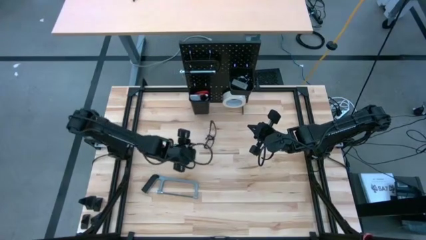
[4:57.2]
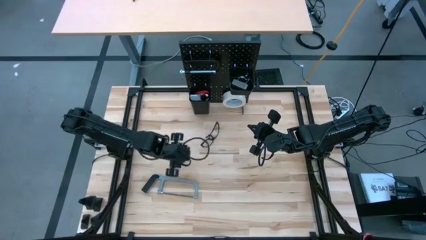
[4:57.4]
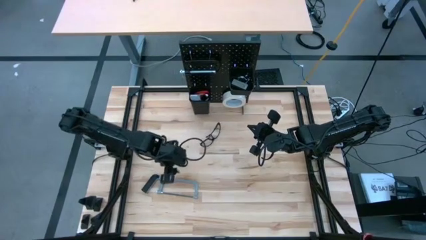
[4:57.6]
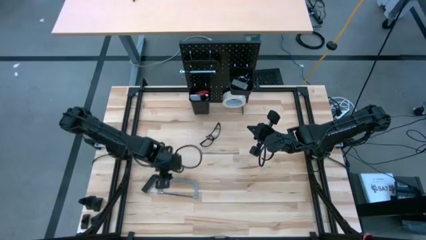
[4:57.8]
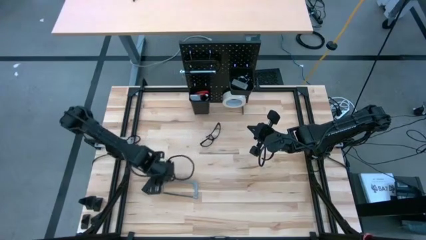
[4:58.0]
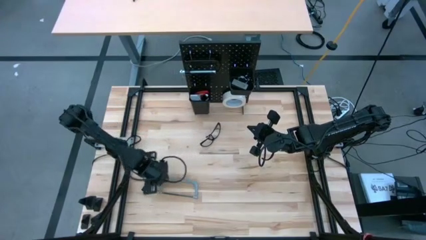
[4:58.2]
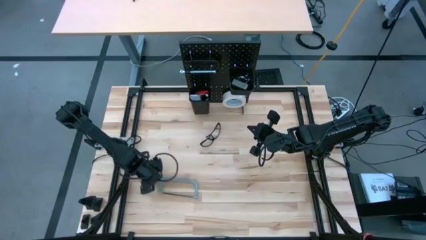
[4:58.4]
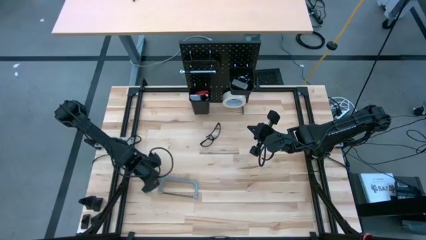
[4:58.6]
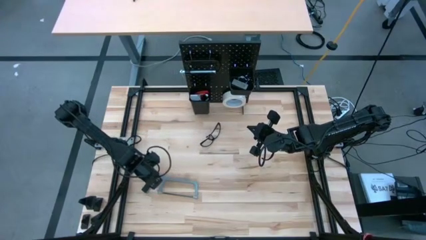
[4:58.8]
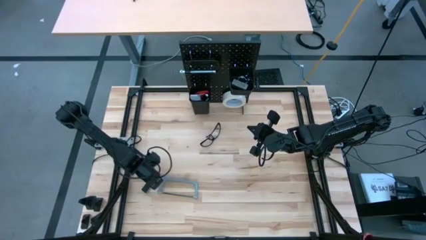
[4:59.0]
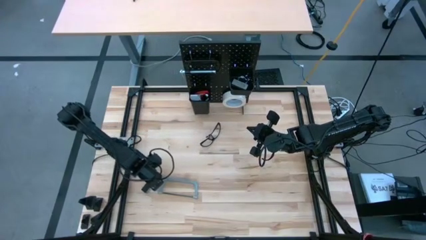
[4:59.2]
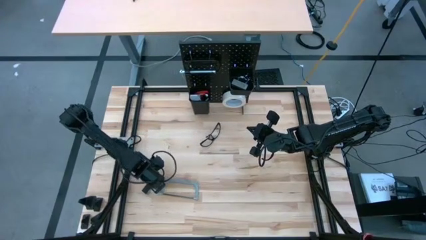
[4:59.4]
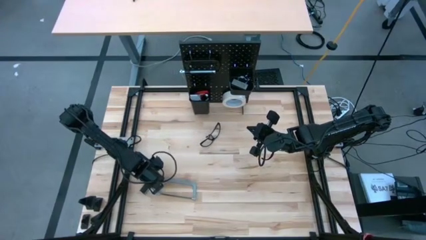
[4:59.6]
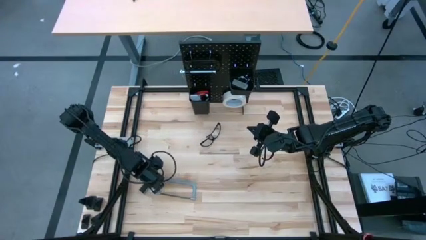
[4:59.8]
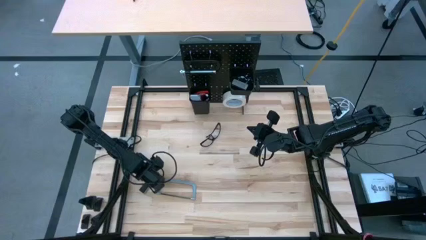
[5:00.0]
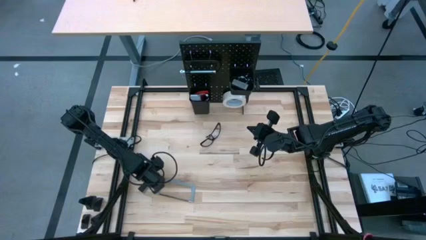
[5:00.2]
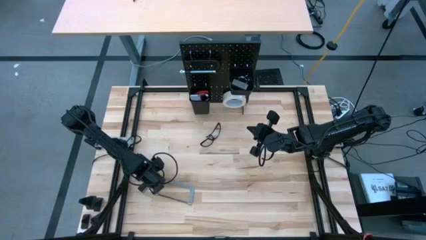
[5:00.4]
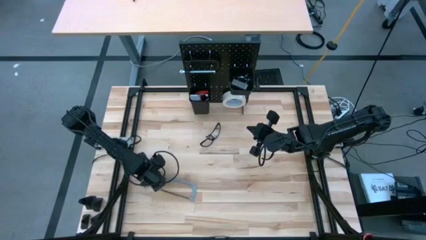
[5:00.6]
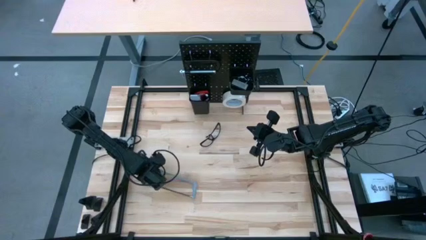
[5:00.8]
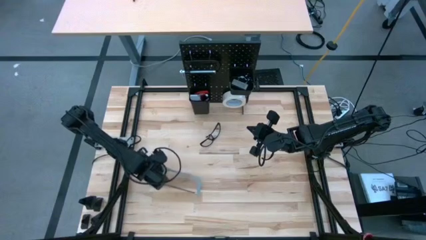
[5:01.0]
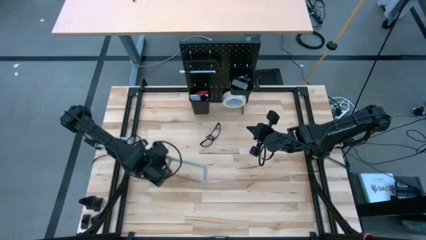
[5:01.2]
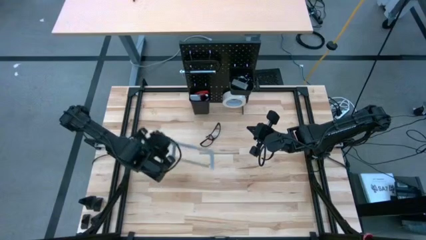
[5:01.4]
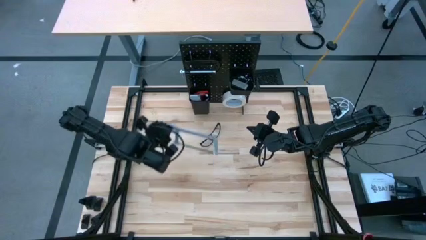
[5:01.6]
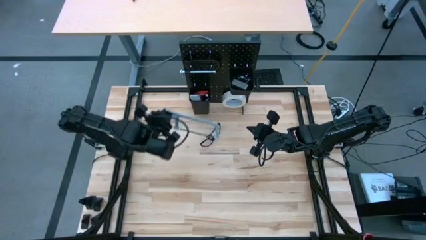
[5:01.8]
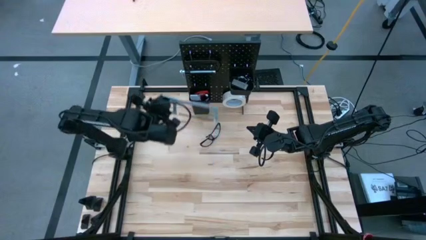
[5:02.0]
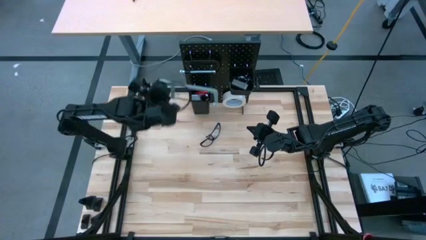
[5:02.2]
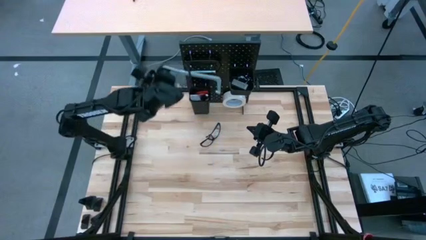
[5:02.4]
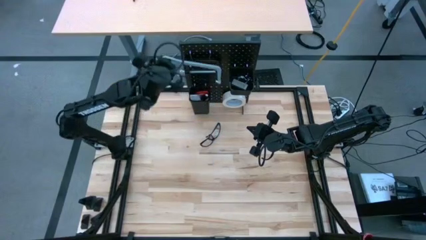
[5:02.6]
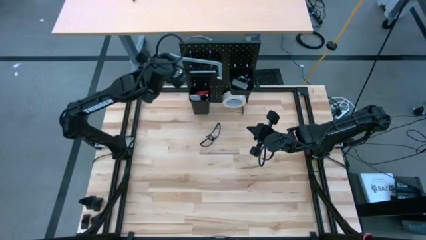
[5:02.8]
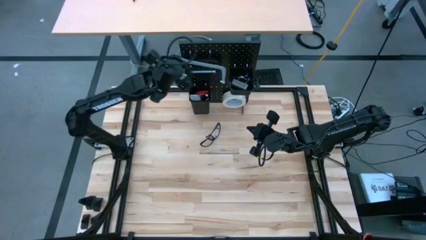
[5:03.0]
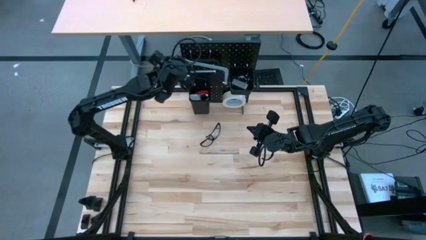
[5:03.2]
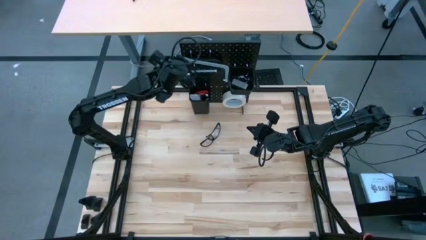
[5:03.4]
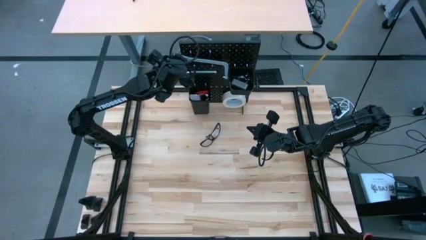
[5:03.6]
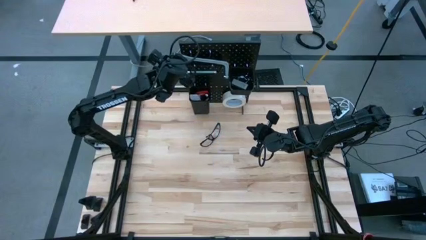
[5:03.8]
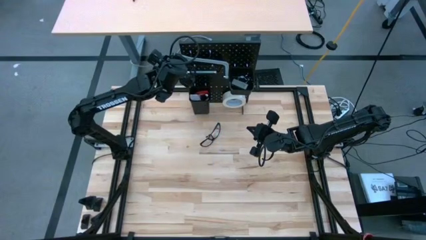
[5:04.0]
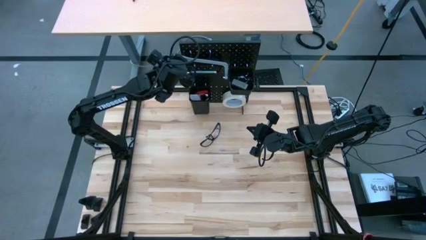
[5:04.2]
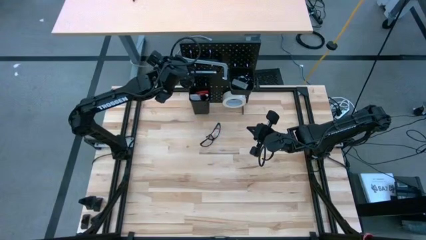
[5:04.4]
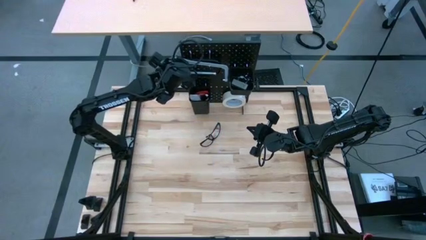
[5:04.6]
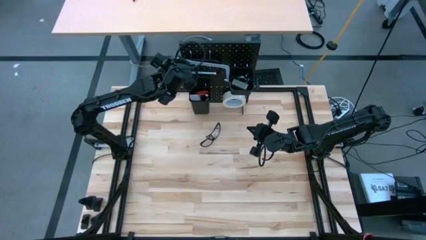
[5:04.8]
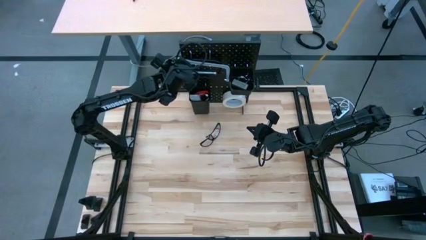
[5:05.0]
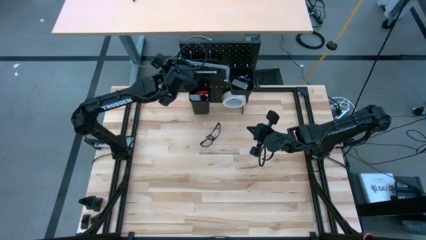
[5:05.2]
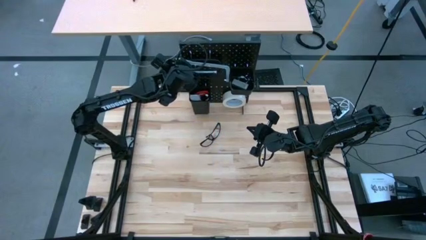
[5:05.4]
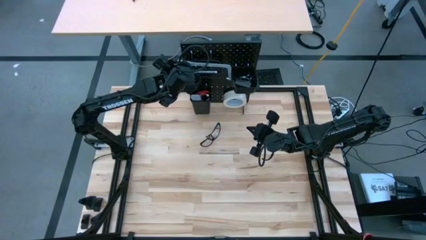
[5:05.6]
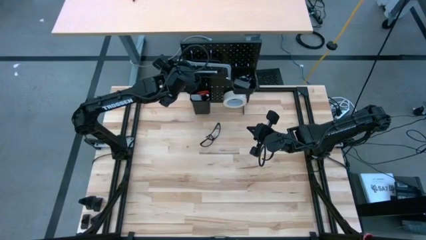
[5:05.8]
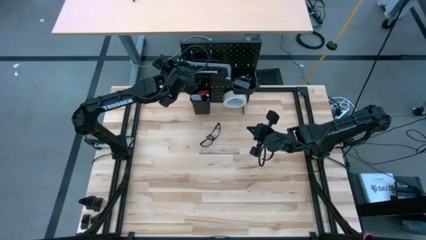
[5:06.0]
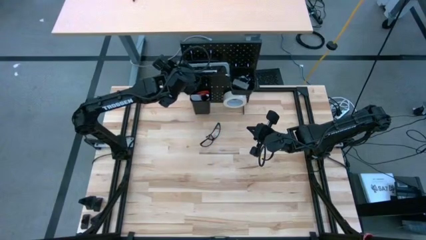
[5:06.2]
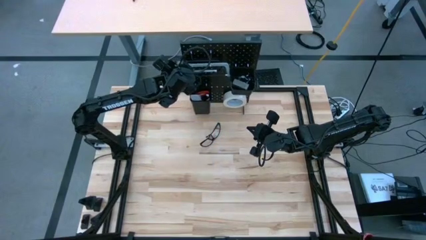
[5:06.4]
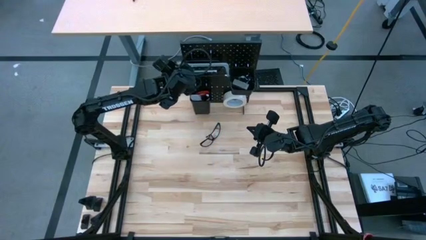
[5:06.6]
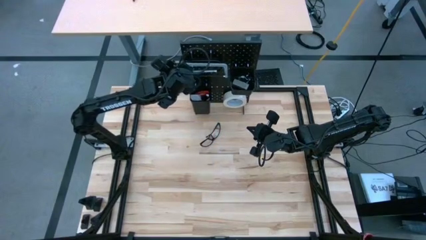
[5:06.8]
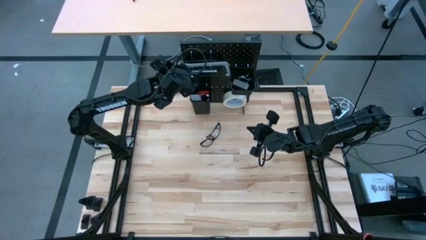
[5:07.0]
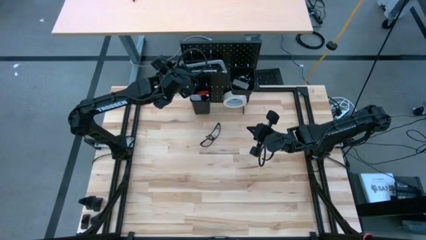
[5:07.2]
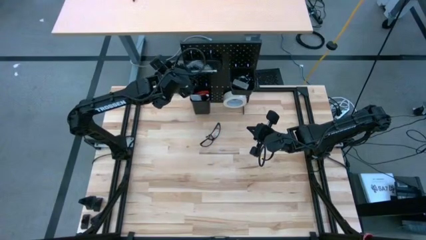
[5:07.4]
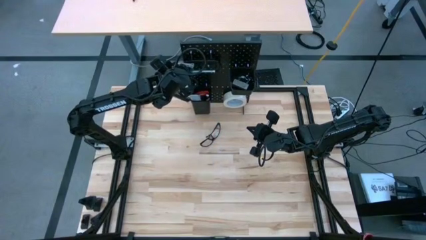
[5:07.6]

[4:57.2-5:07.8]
Task: Hang tools onto peg board
Hang the gray hacksaw on the black peg board

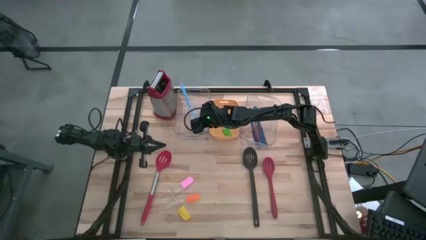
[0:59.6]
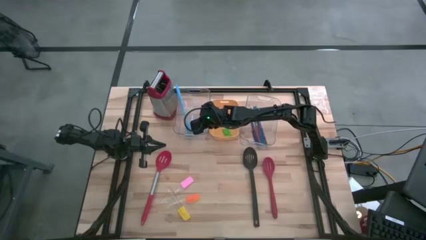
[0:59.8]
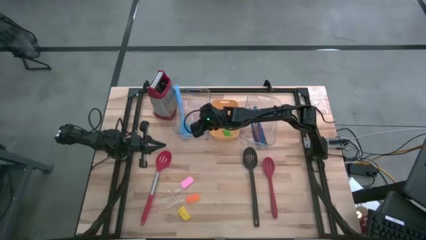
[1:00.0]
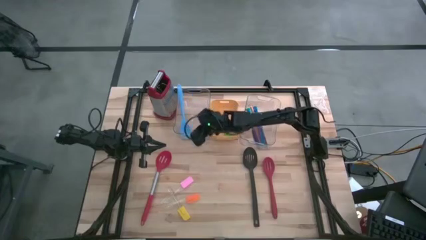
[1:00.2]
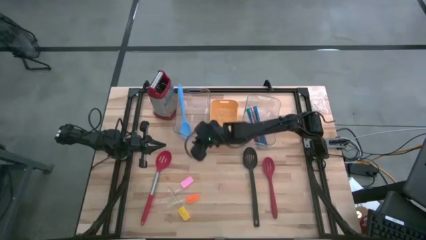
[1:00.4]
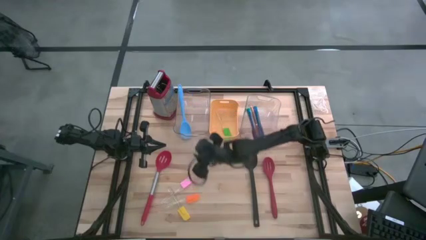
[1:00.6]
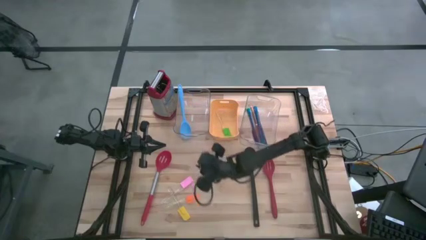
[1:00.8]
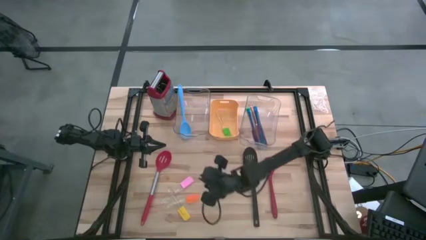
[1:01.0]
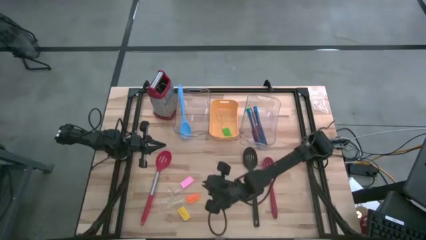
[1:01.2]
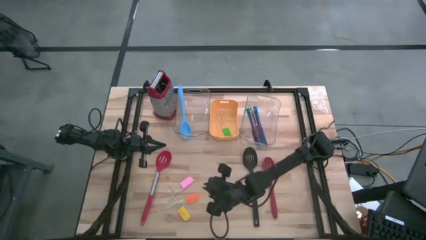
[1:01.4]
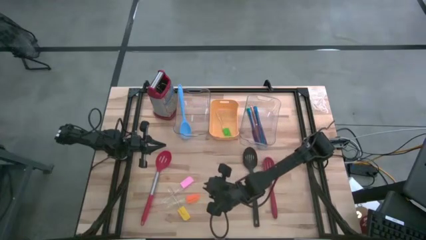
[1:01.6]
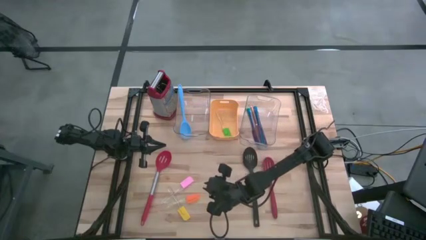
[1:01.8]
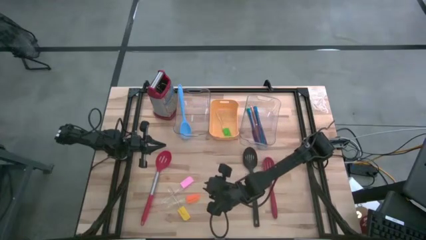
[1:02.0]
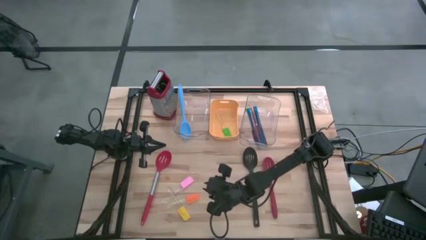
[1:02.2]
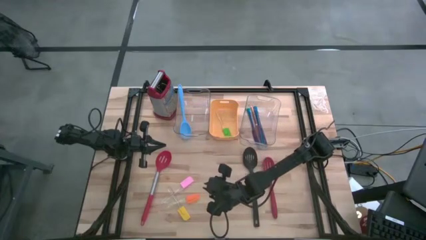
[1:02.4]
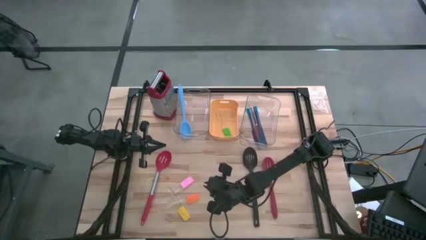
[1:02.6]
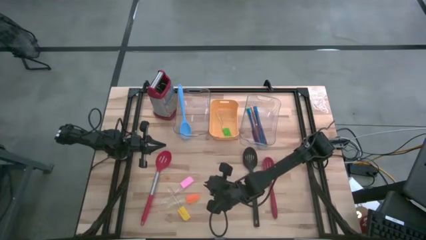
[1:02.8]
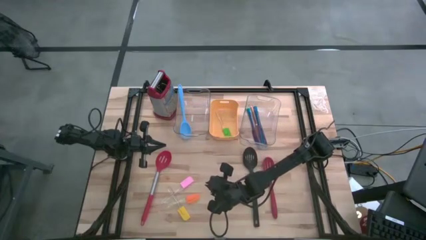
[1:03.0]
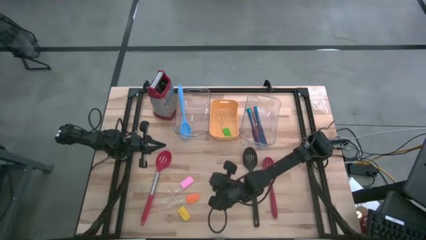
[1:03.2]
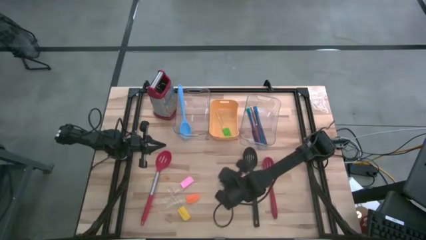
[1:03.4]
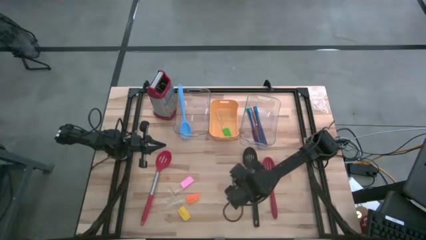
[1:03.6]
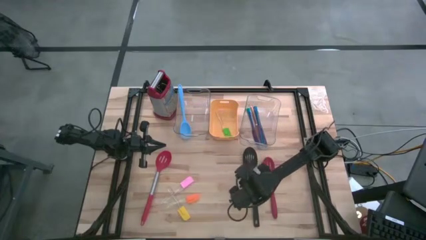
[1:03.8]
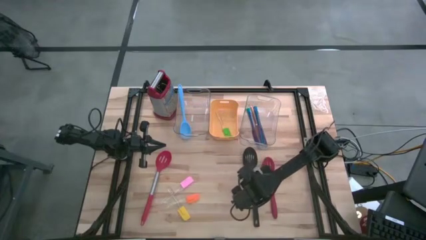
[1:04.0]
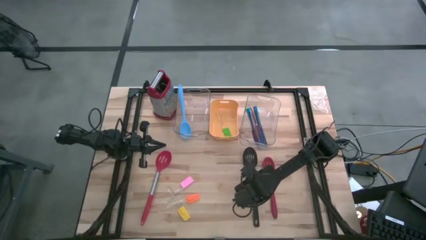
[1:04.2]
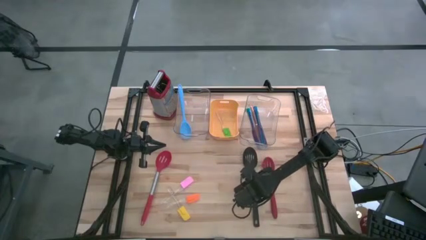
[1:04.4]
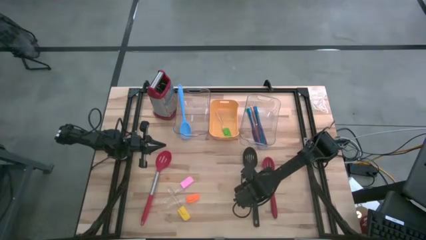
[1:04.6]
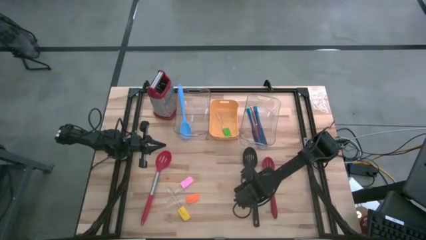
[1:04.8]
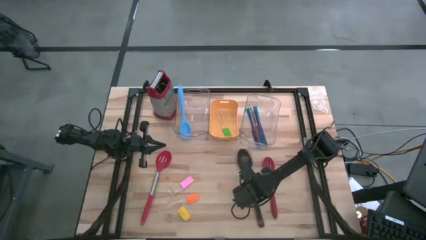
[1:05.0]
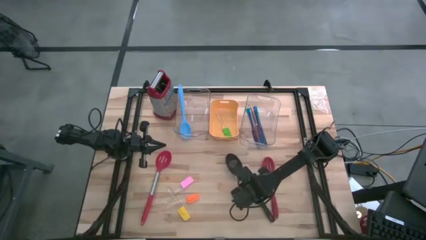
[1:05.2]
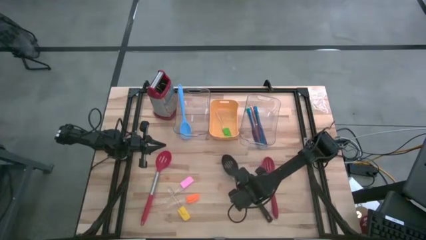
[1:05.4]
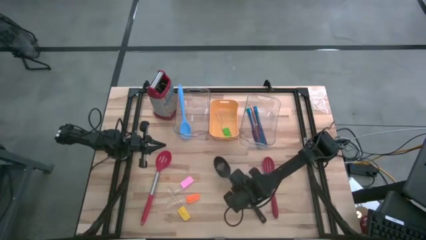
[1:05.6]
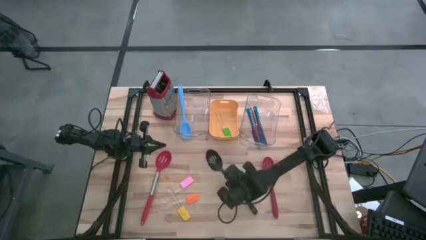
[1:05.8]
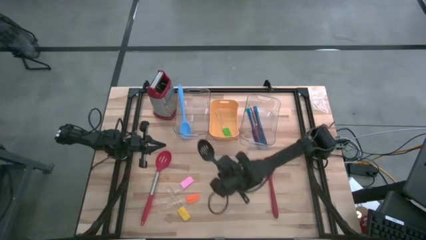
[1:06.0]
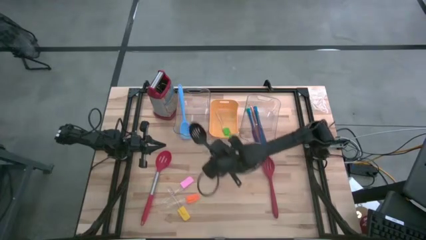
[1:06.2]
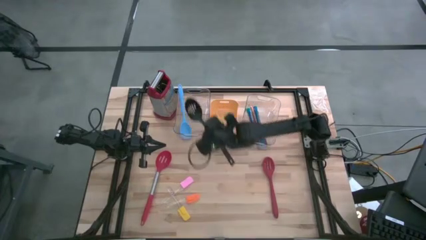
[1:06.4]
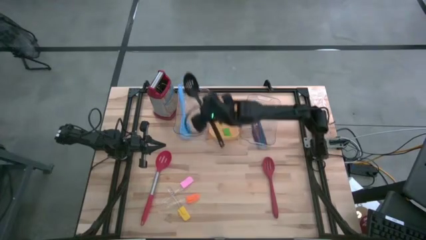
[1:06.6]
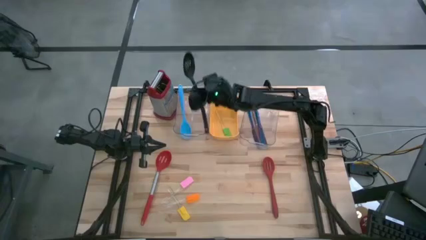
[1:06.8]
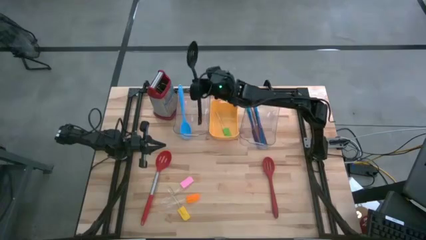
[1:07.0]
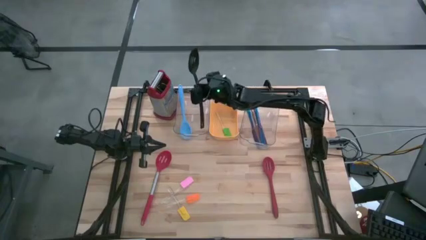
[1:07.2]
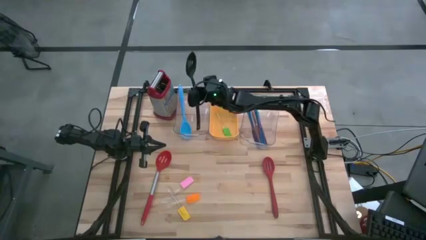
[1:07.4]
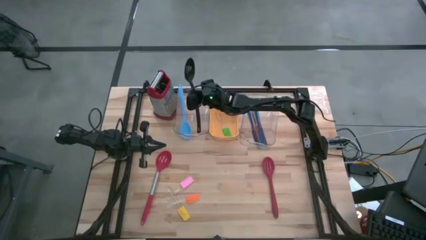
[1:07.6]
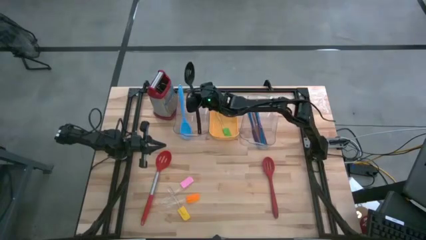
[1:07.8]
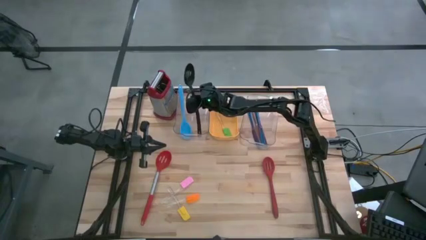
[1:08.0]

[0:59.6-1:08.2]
Task: Pick & Place Kitchen Items
Put the black spoon into the left transparent bin
